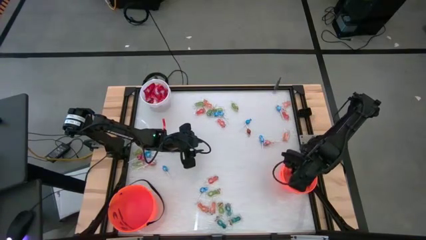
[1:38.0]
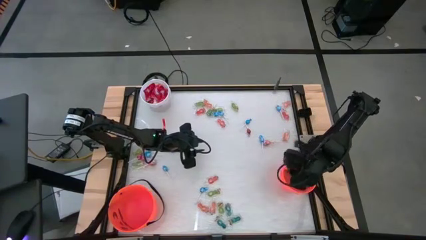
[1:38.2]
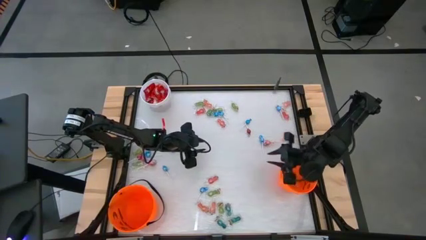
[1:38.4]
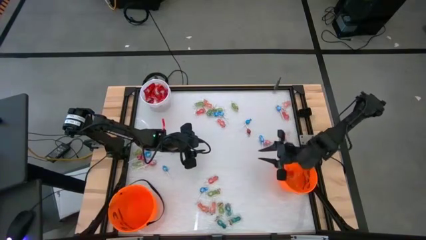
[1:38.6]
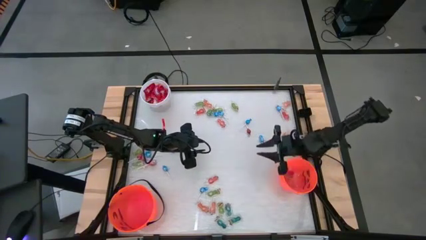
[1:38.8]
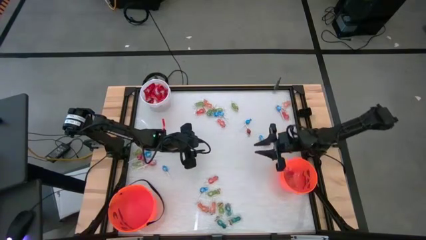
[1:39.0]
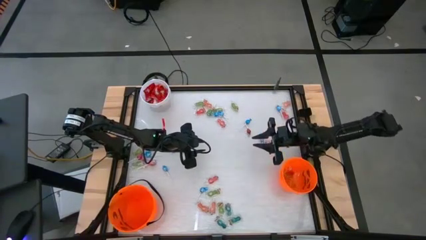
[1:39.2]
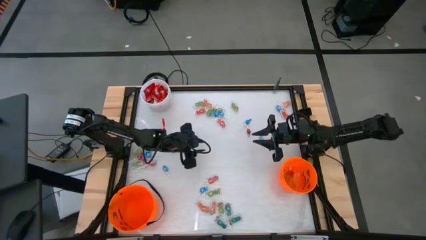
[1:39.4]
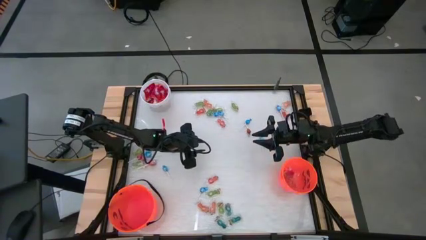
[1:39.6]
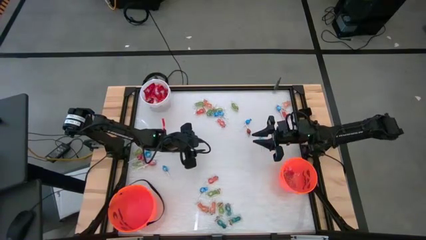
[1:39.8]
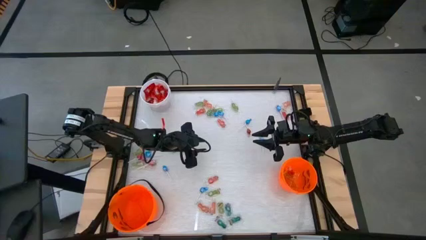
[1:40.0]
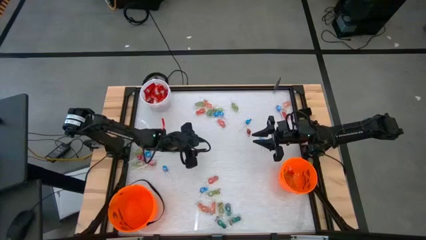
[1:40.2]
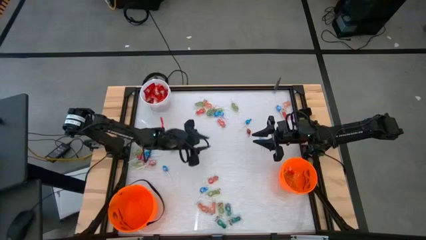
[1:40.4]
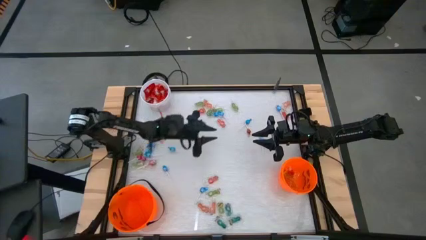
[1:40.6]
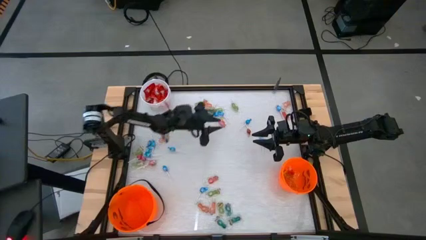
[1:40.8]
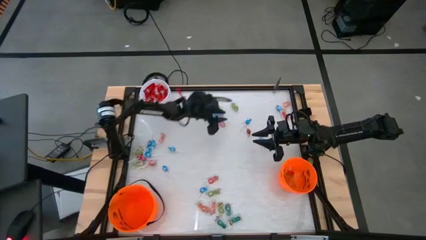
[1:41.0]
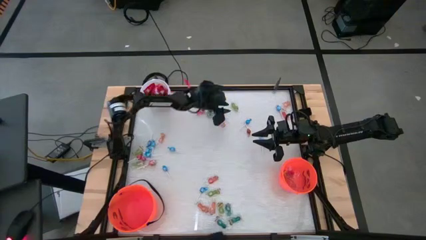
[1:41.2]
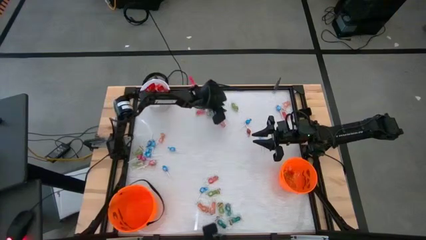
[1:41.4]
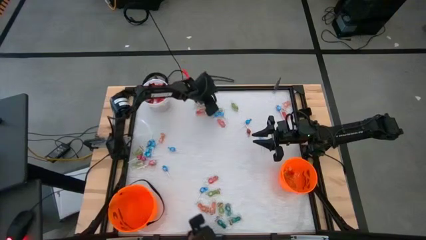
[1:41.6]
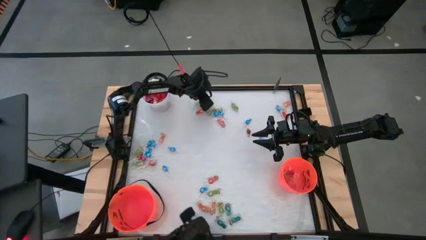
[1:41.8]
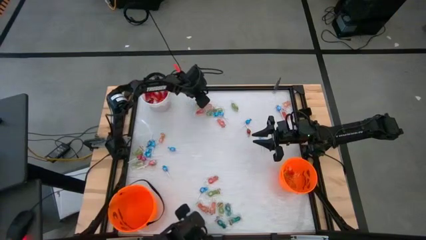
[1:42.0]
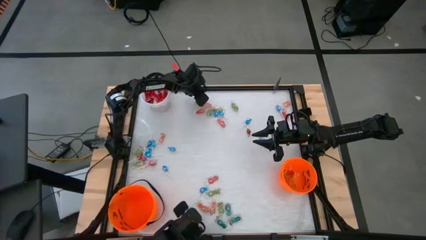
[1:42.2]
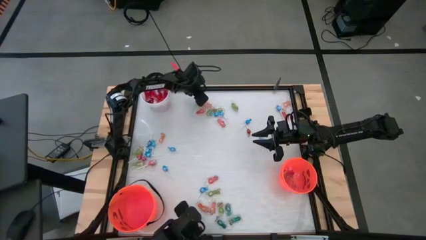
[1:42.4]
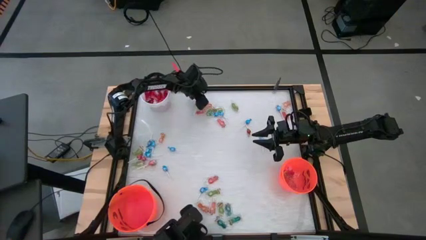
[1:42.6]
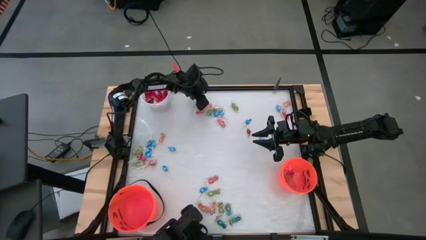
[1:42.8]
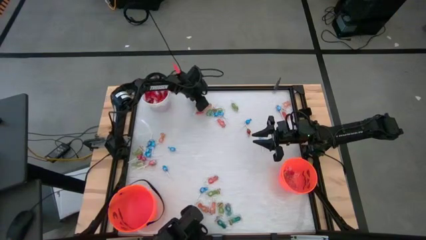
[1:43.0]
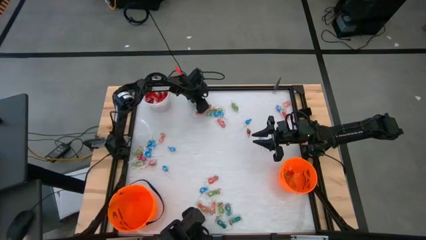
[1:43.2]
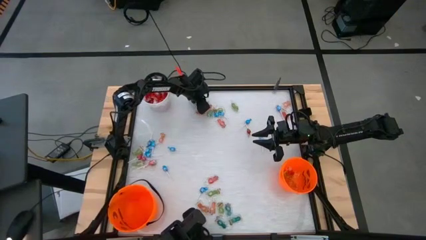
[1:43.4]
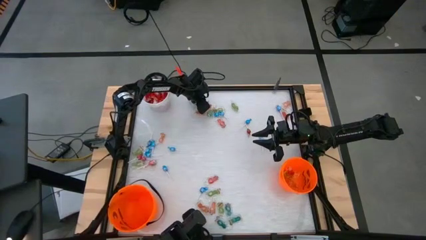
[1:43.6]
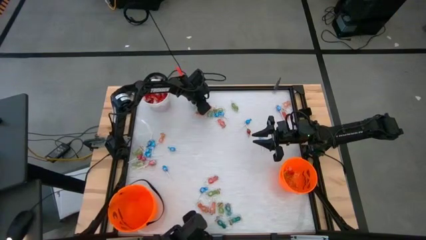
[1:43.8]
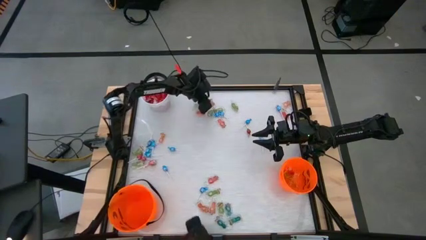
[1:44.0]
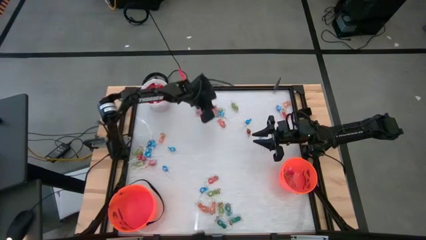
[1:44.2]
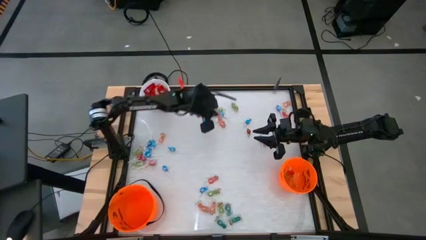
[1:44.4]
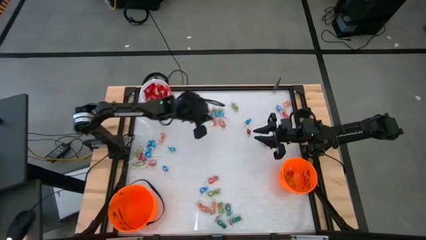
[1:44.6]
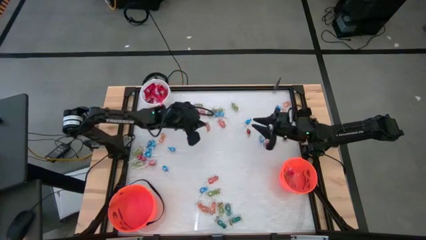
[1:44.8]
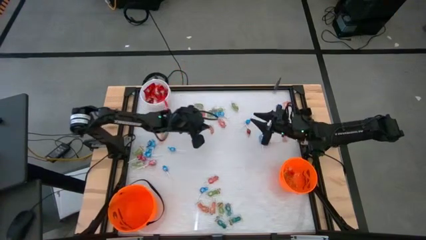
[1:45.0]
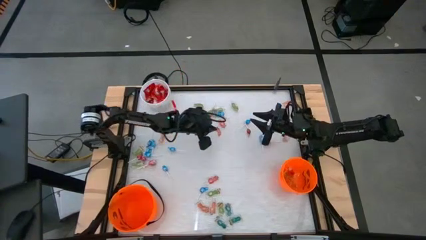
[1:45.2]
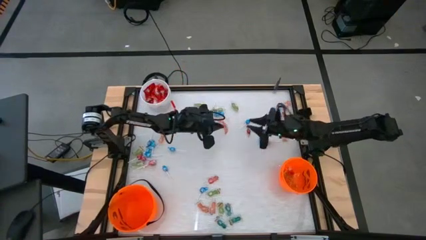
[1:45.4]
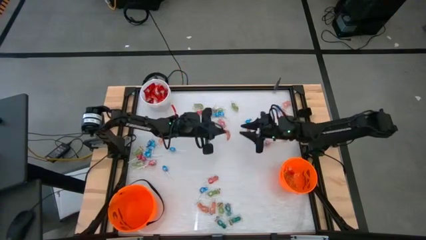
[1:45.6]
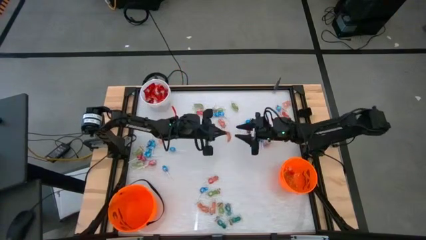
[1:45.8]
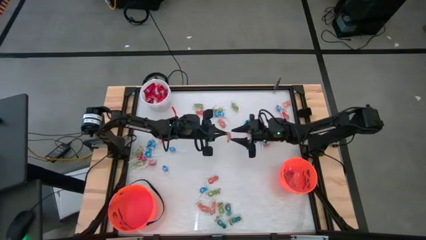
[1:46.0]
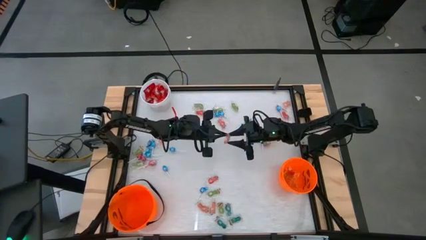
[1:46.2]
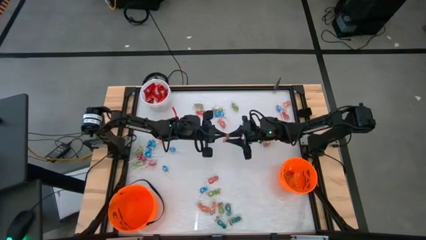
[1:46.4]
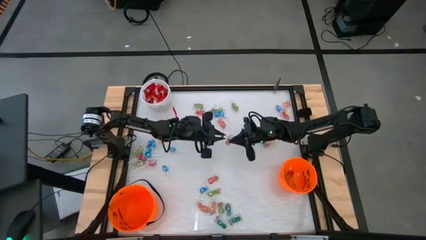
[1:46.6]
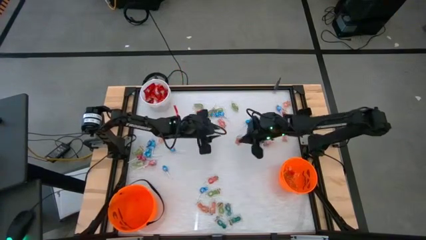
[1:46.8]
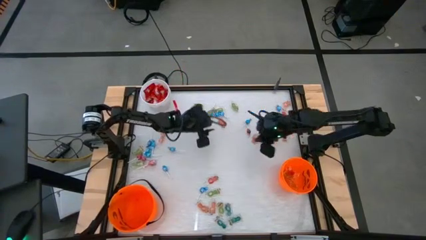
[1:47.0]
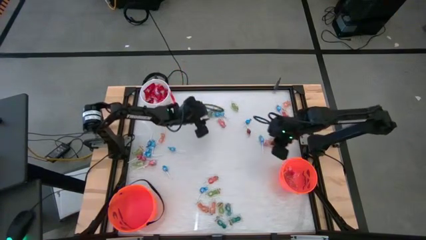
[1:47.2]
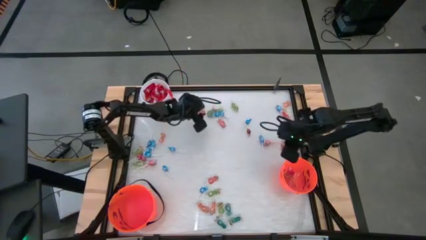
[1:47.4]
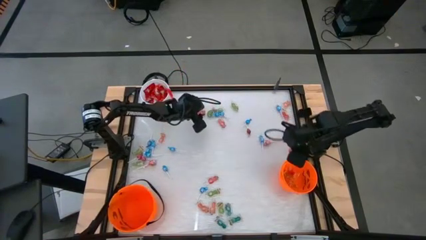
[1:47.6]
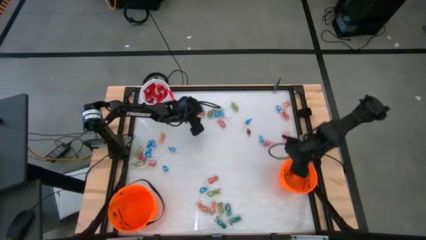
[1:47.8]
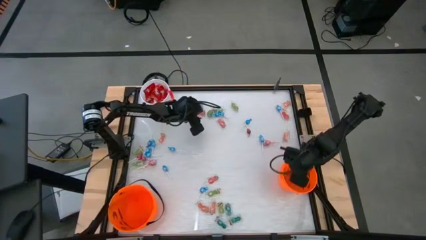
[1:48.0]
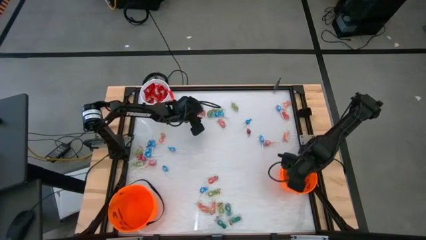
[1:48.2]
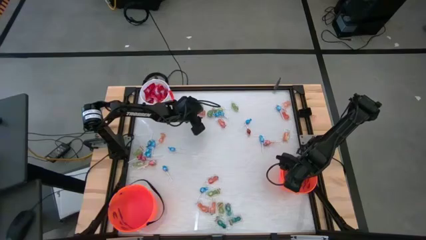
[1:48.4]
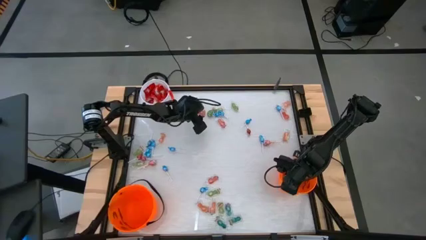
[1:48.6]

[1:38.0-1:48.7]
Task: Sort candy by brand, put in halloween buckets
Put the orange candy into the right orange bucket

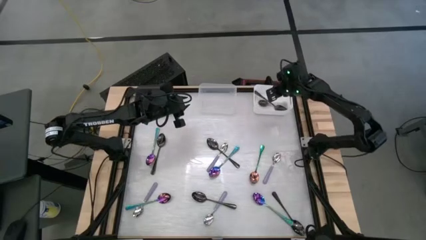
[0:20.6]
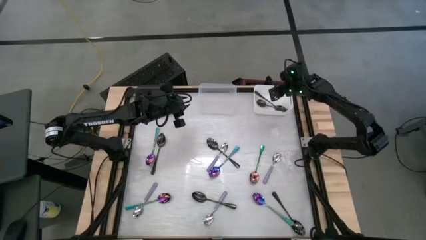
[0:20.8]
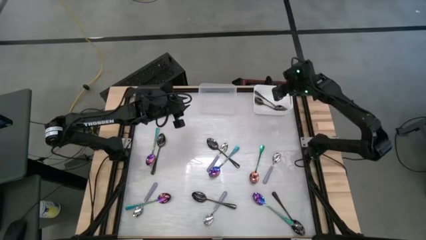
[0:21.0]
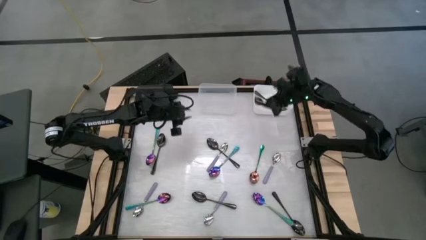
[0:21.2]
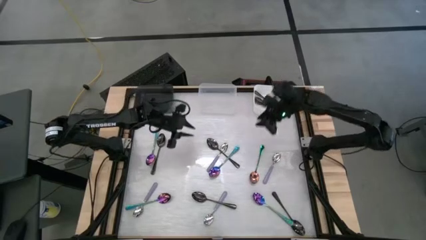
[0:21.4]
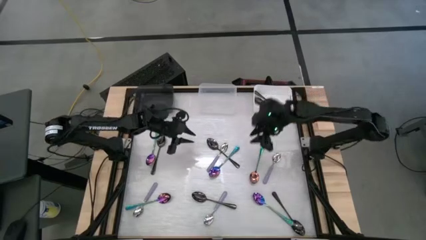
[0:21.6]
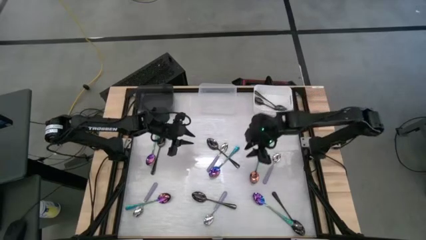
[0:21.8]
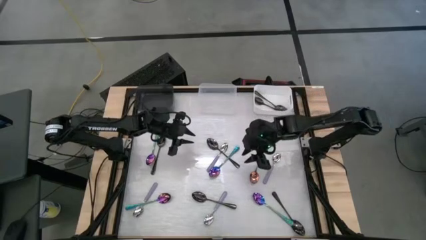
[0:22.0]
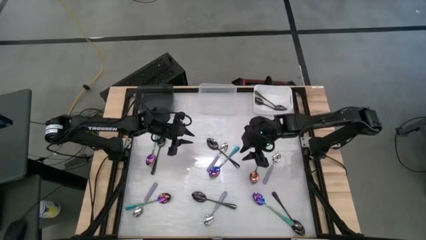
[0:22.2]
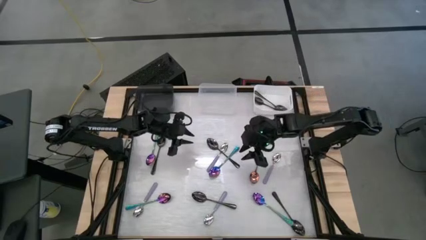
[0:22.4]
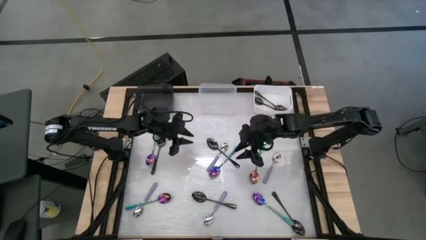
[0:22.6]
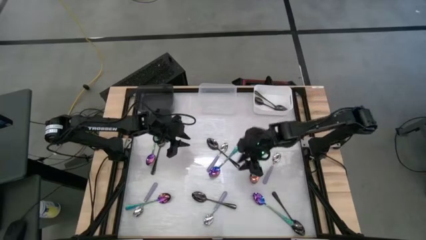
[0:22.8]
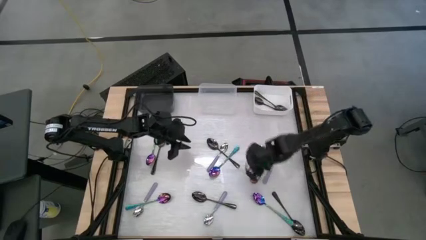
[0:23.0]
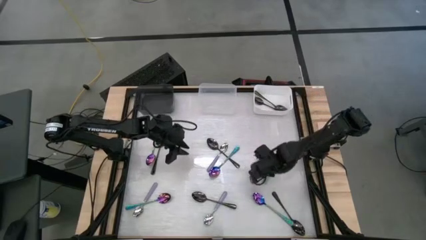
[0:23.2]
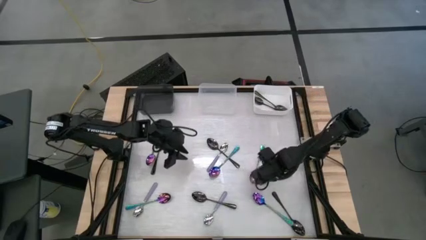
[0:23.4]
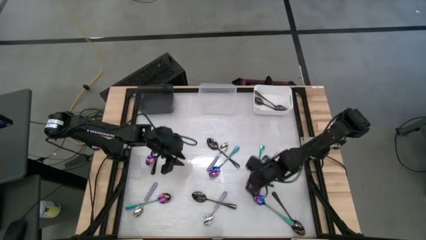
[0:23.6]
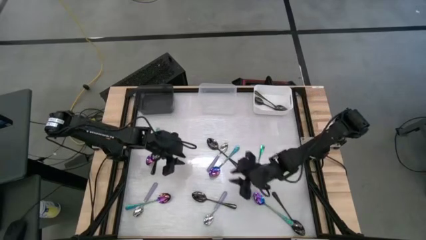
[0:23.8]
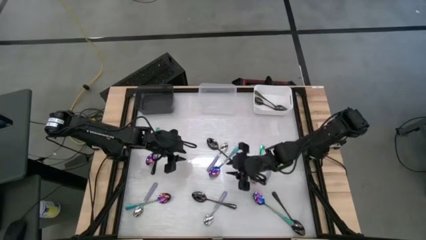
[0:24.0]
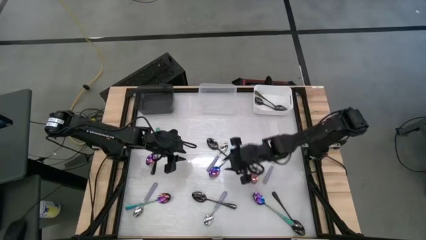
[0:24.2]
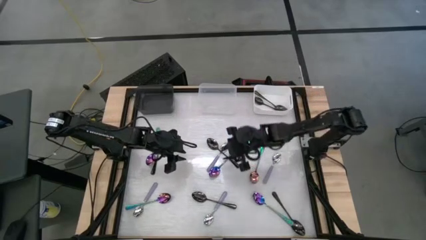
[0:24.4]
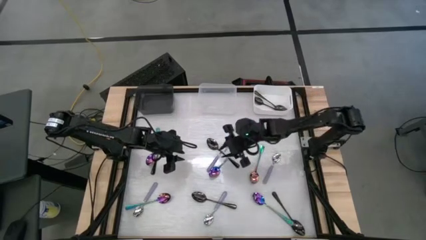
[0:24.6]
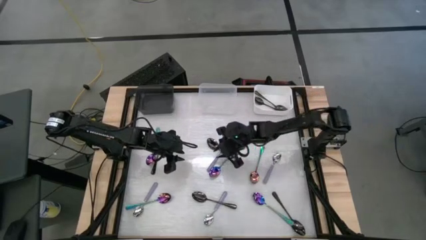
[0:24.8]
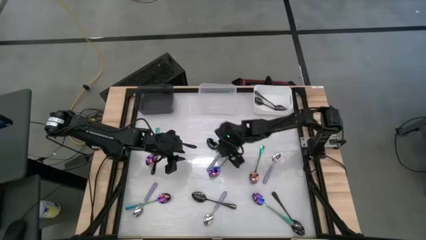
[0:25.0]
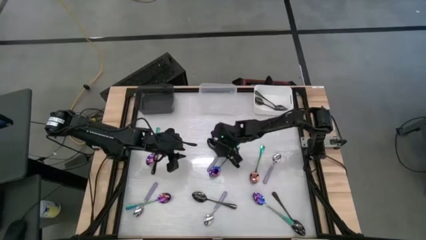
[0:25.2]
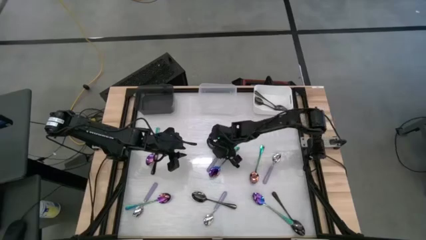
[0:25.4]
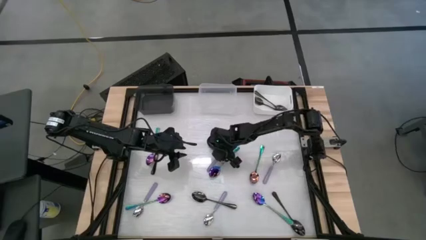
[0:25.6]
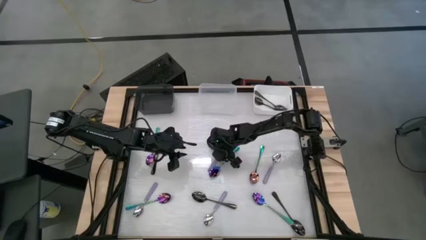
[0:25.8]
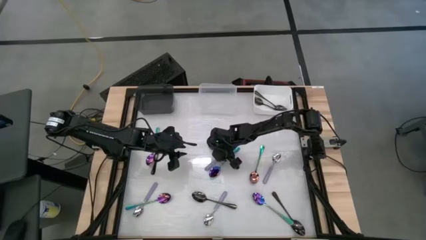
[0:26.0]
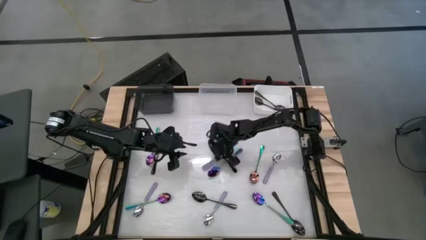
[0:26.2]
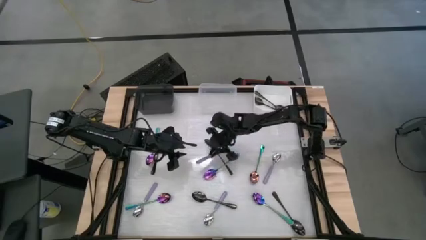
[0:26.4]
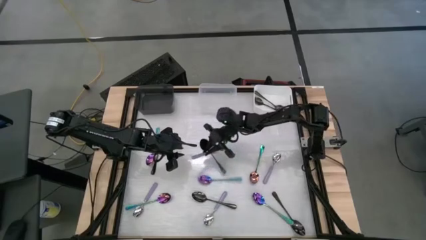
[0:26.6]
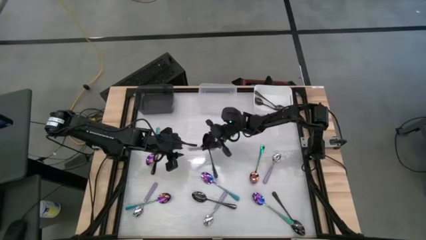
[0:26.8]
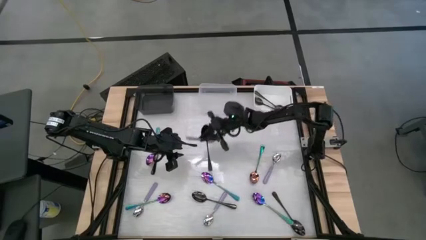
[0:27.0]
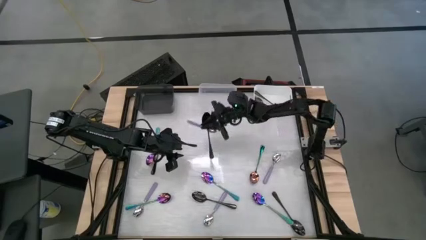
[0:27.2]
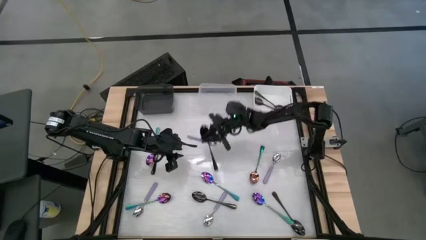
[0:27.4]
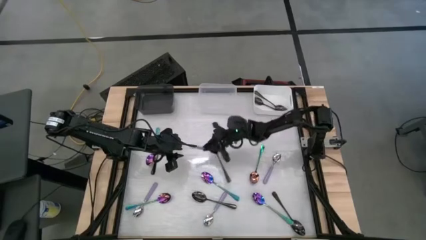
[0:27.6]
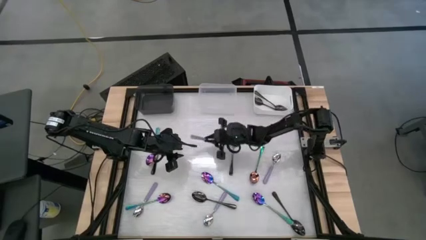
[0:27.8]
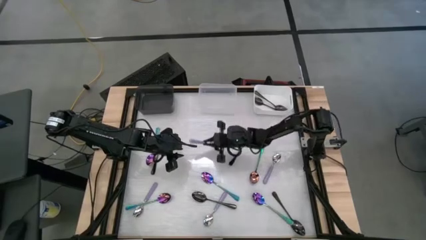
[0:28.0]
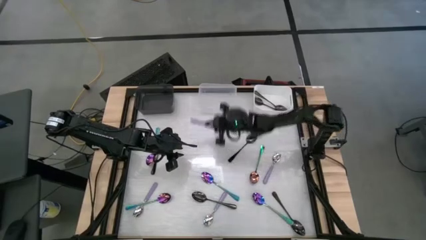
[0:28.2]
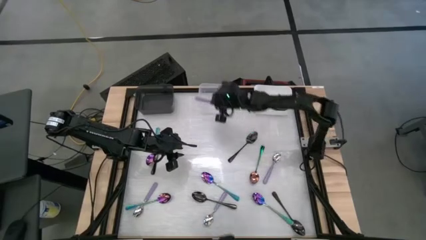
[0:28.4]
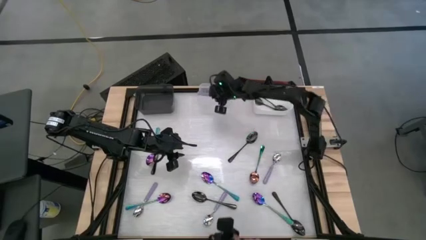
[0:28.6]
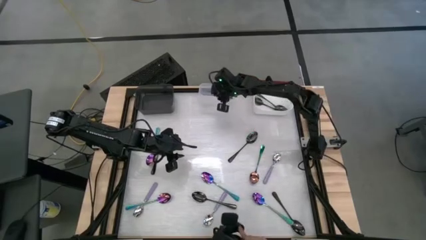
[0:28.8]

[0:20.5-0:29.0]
Task: Sort silverware by color (type)
Put the purple spoon into the transparent bin
